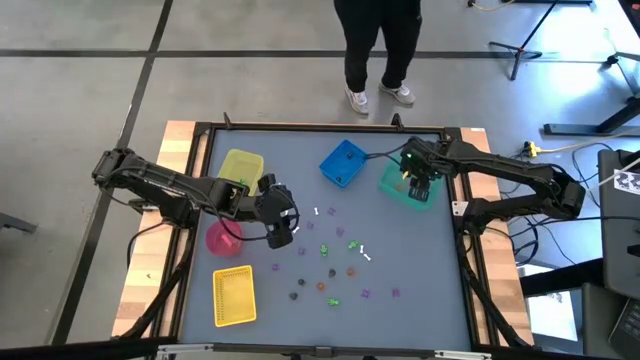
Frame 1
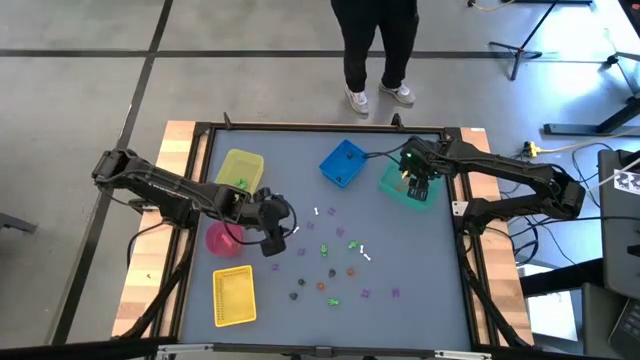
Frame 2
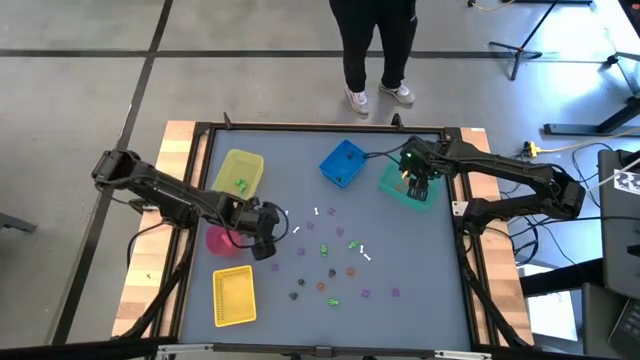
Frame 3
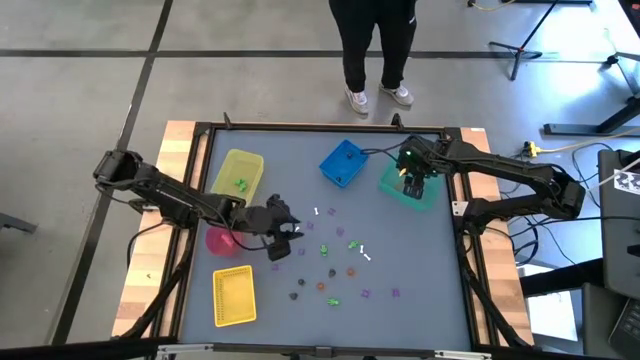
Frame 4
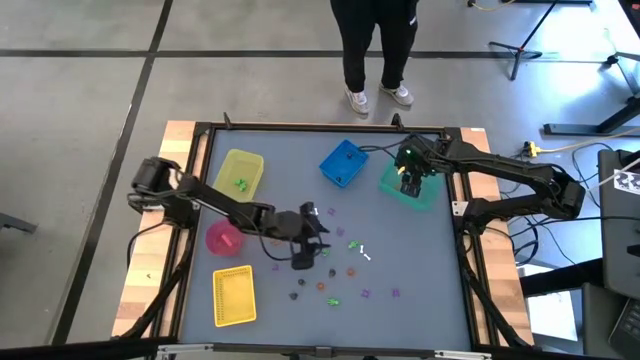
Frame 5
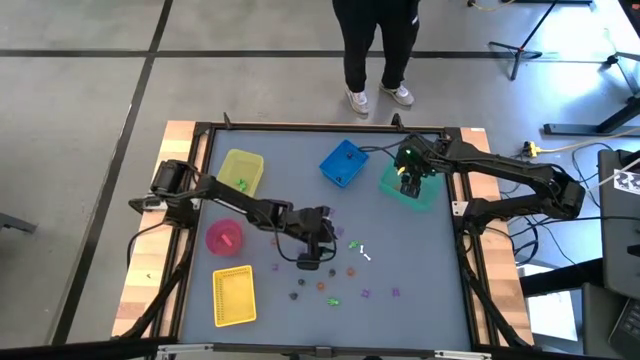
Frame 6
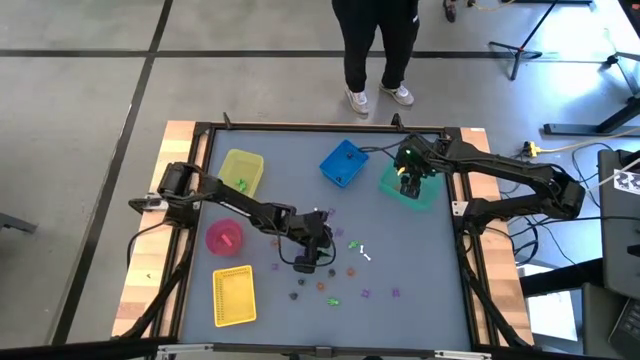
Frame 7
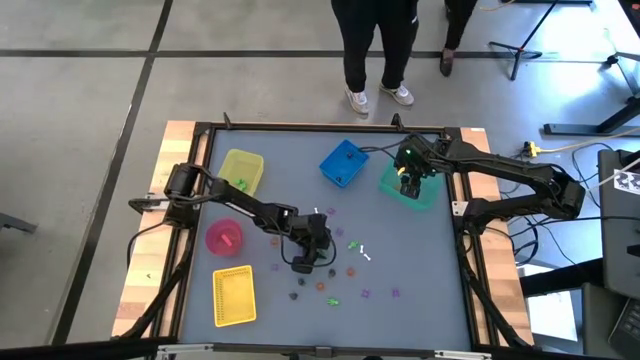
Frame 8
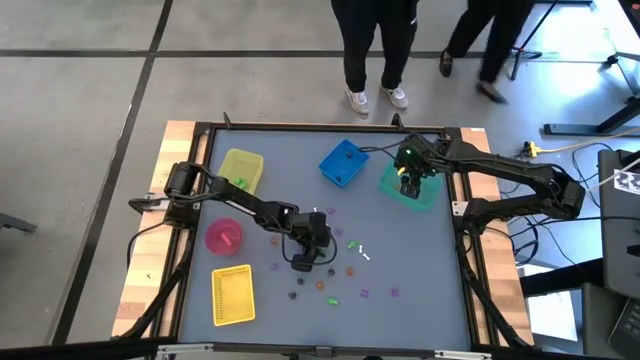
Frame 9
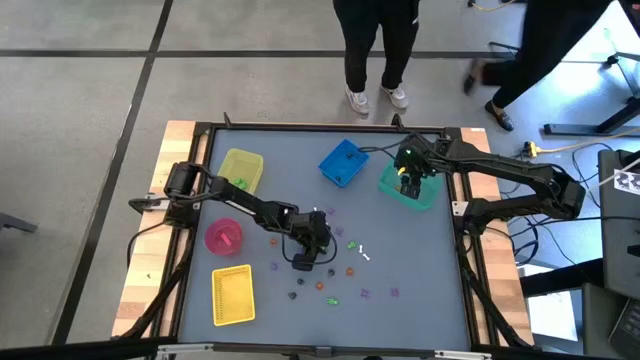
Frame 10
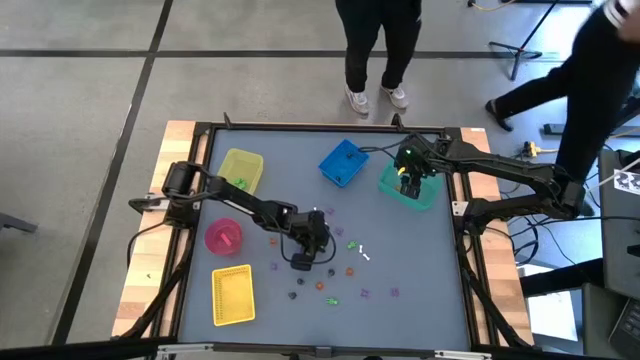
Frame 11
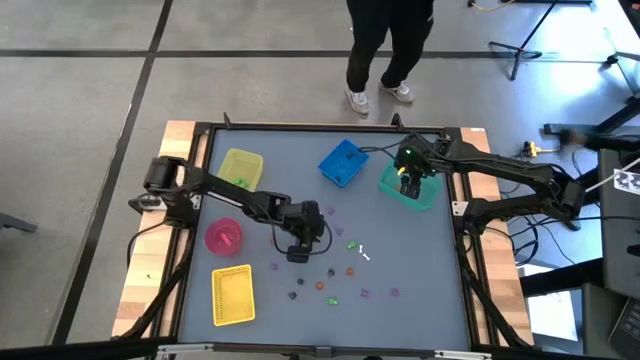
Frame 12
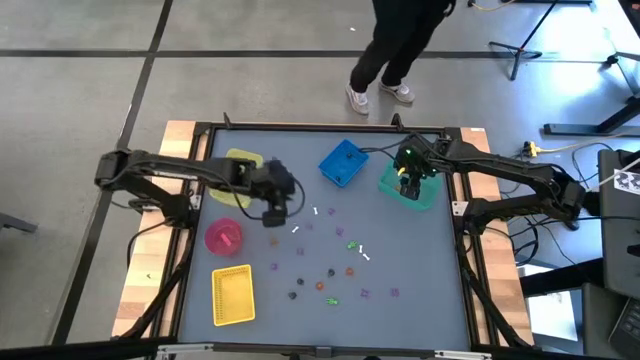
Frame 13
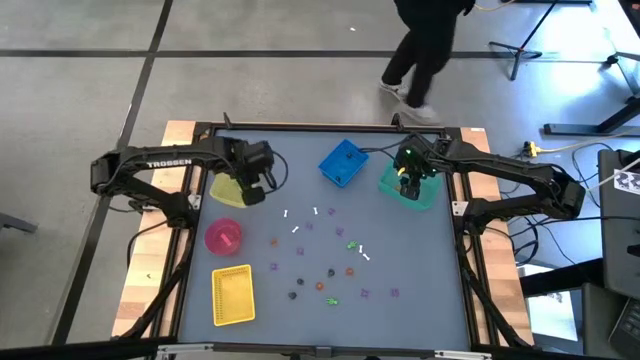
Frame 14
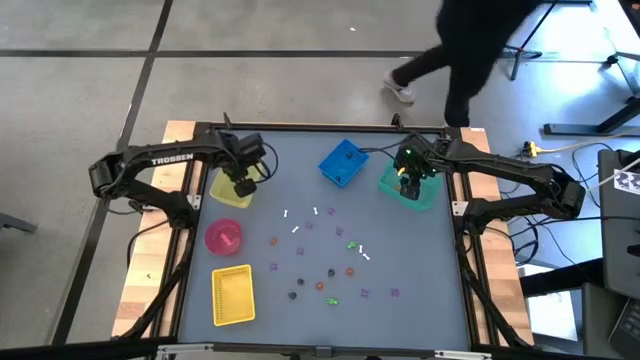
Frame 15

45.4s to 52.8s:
Task: Sort Halloween decoration
Put the green skeleton toy into the yellow bin

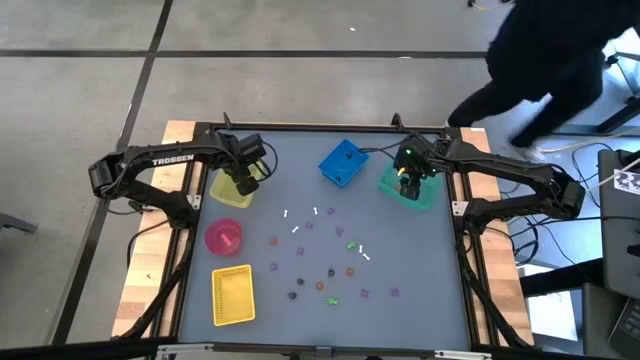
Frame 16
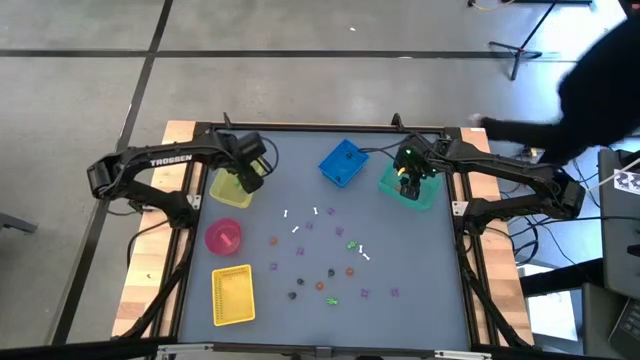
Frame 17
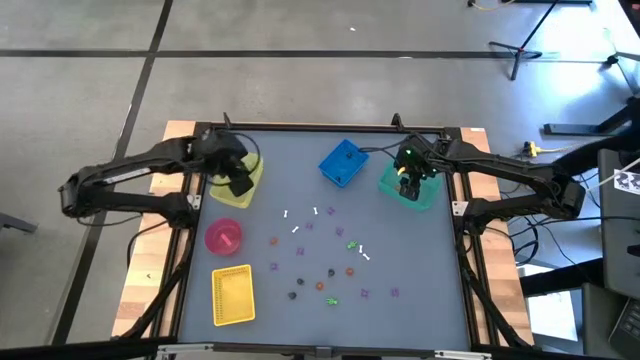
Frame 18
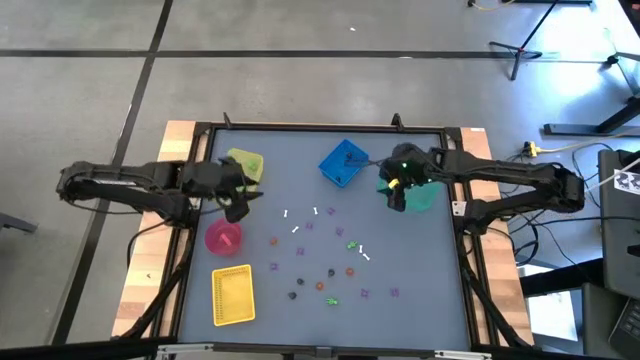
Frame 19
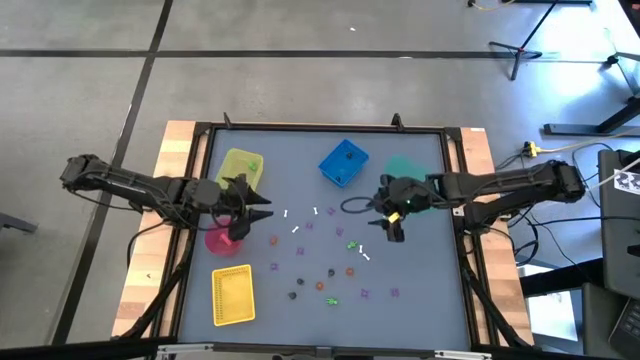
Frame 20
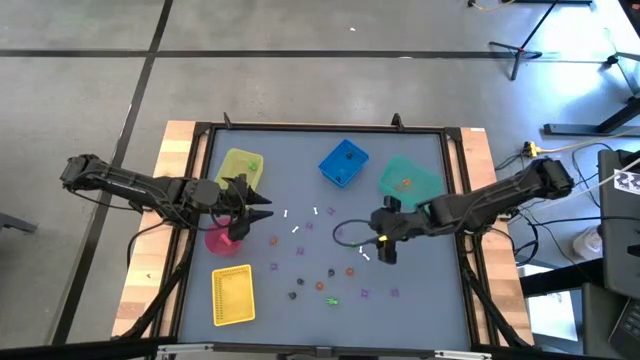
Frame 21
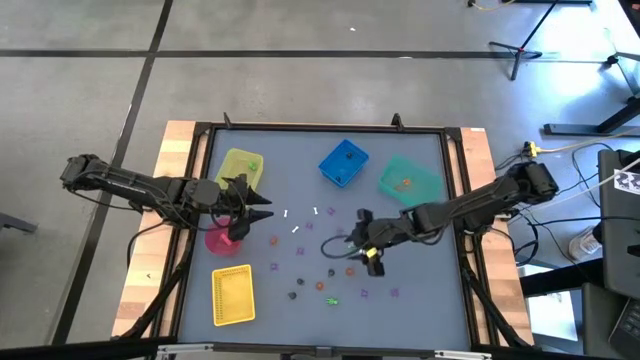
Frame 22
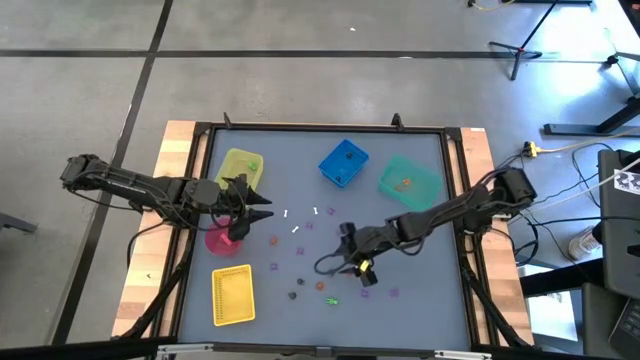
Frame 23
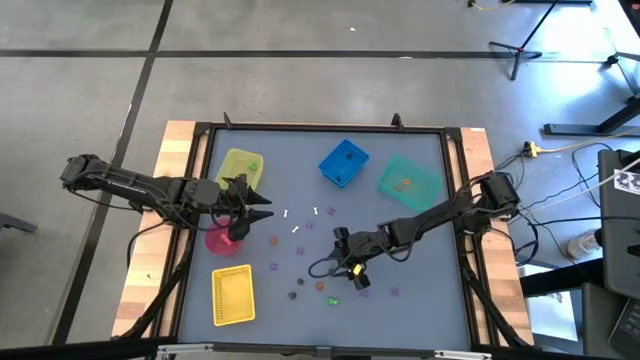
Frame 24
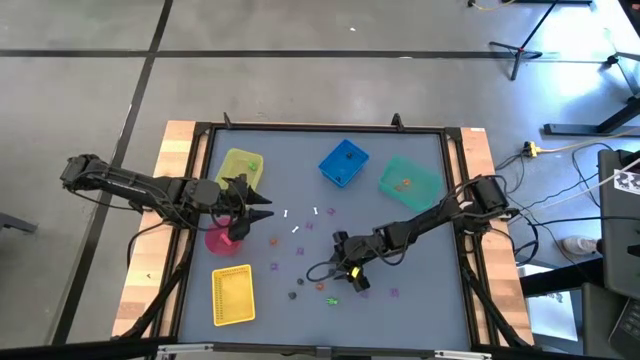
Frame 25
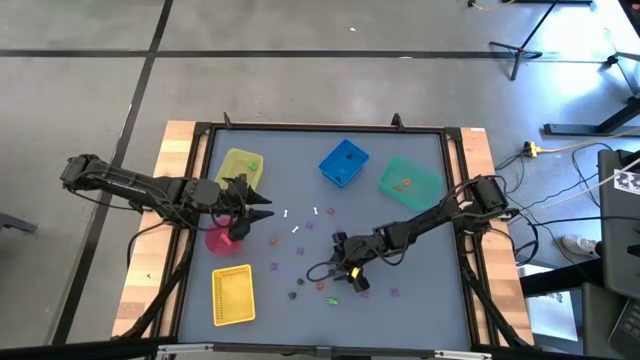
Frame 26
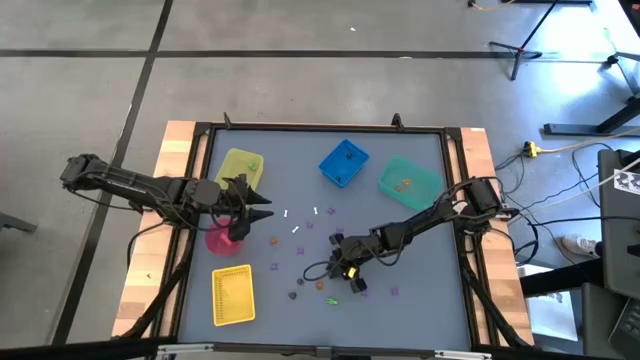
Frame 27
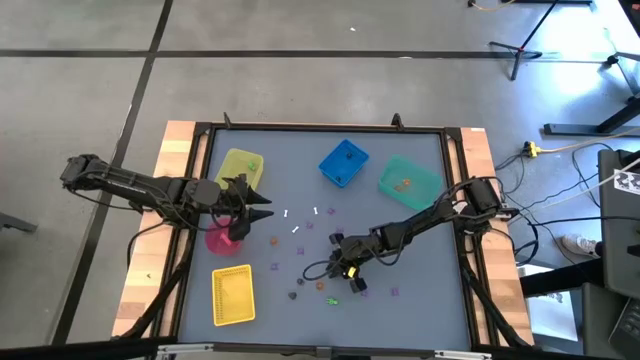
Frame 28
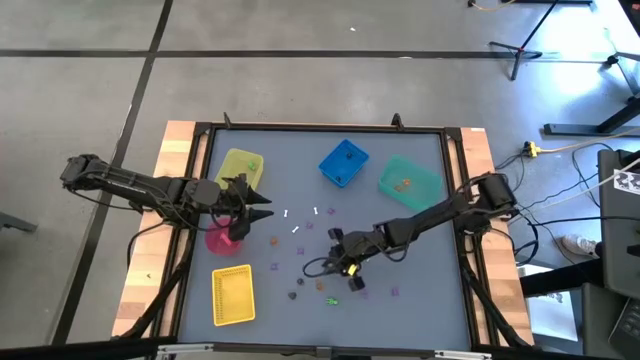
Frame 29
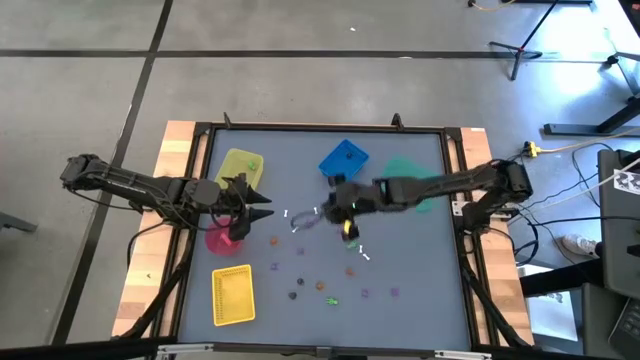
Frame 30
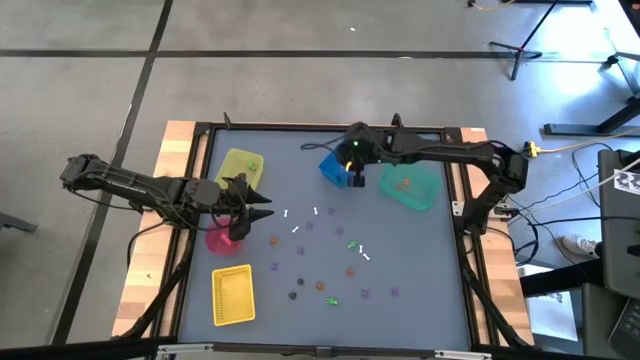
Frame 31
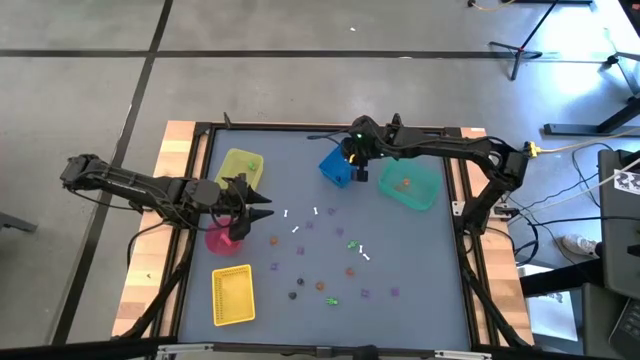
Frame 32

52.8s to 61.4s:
Put the black skull toy into the blue basket

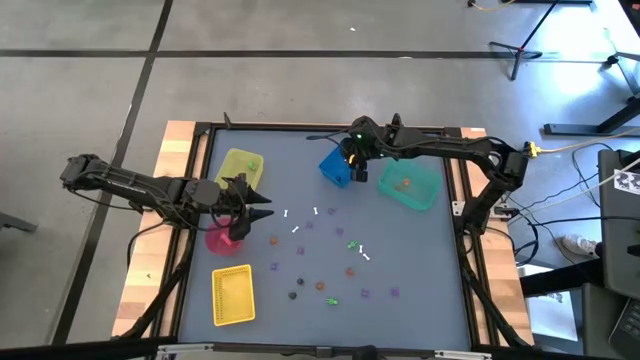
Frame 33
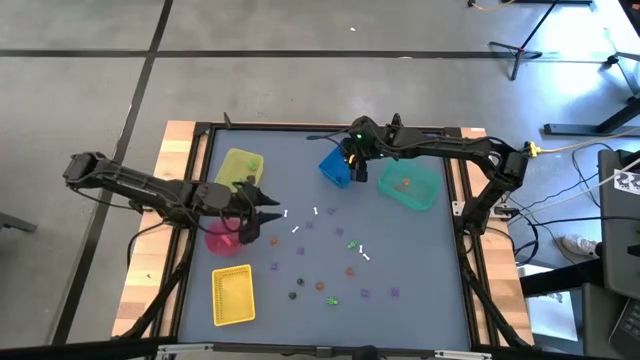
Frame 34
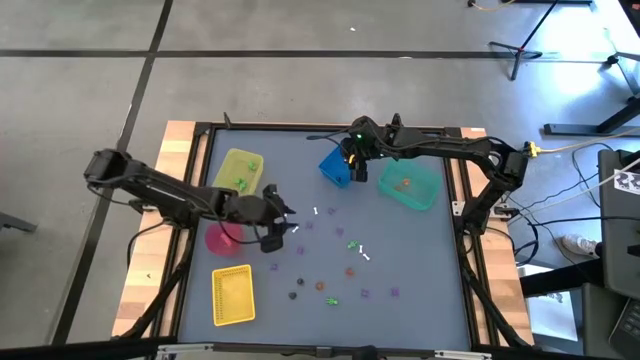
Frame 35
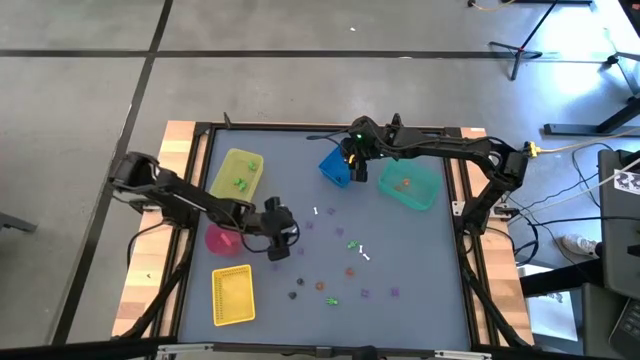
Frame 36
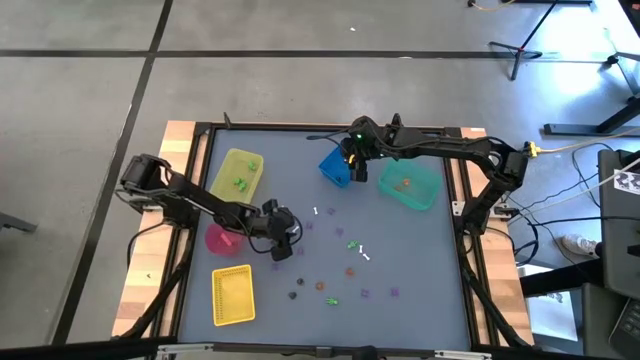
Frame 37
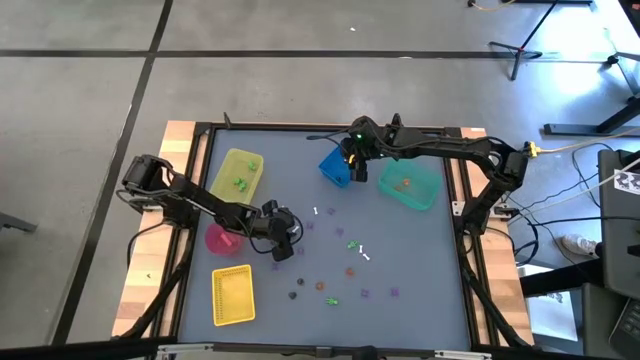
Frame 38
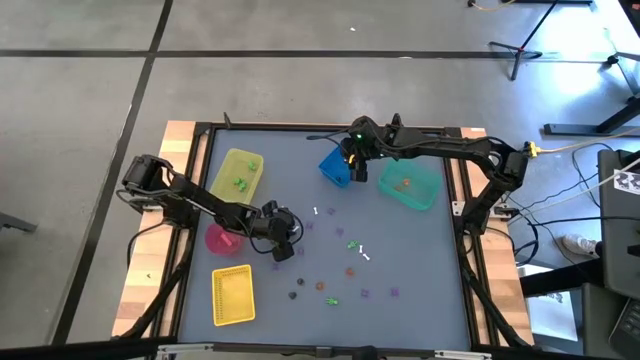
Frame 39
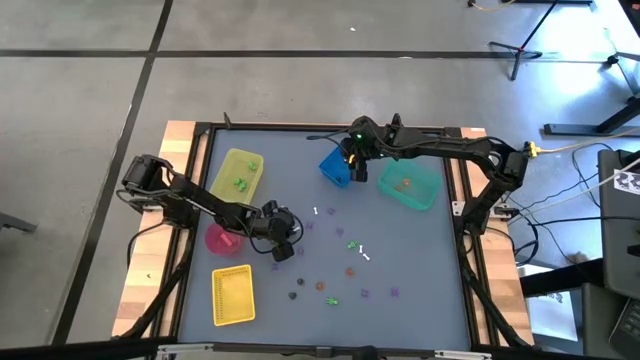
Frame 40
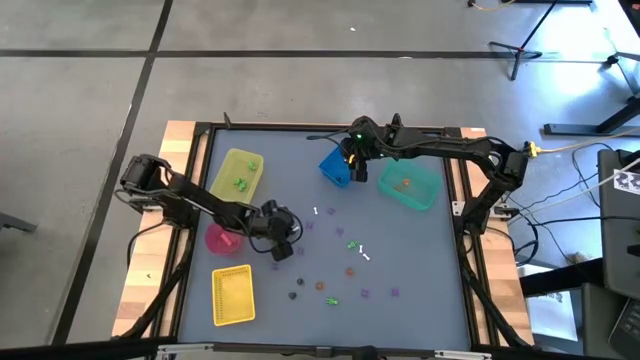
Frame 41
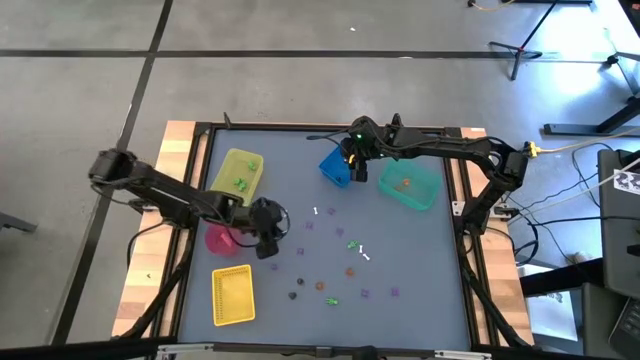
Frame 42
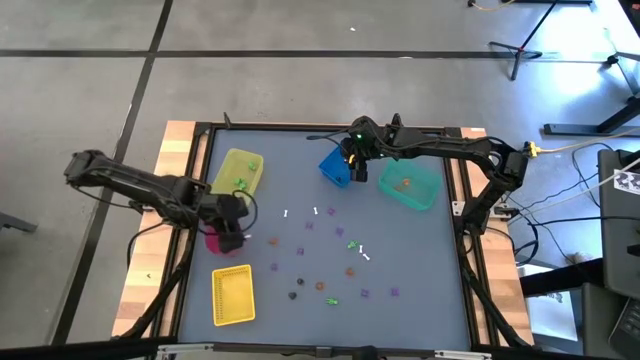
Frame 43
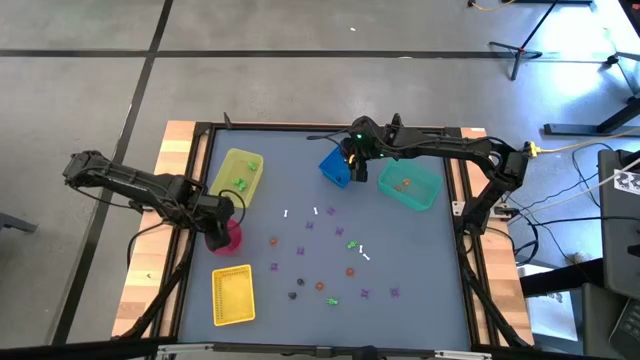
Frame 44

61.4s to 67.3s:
Put the white bone toy into the red bowl
